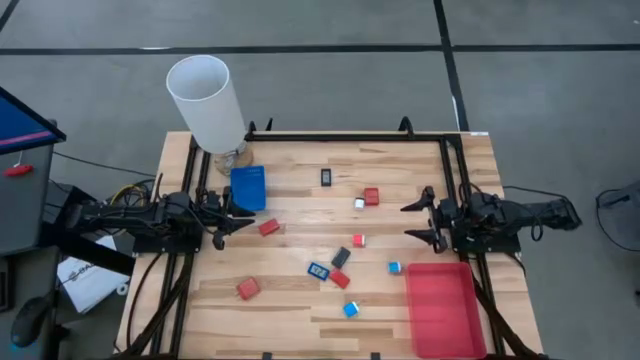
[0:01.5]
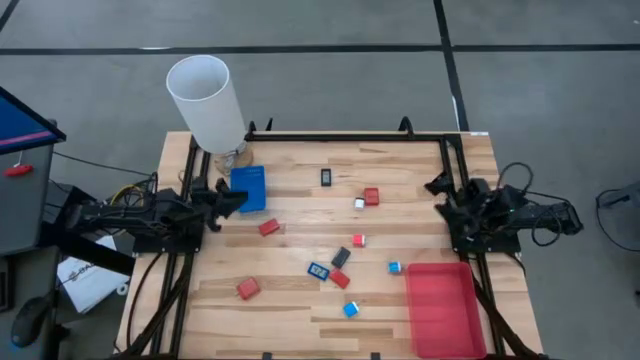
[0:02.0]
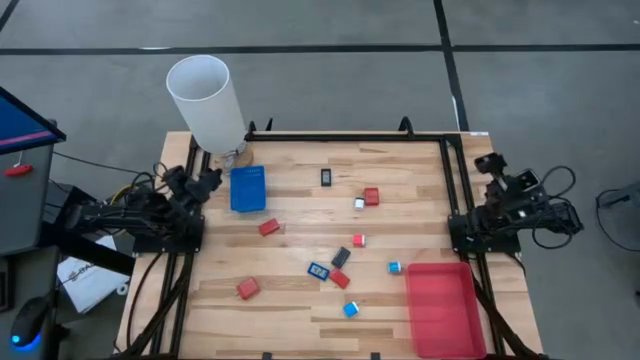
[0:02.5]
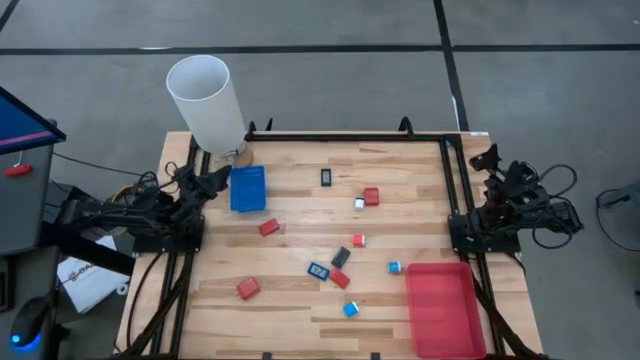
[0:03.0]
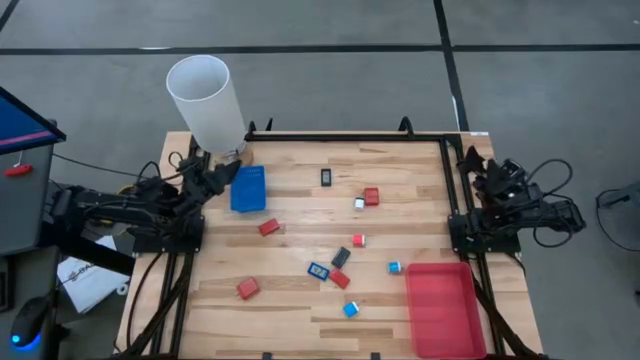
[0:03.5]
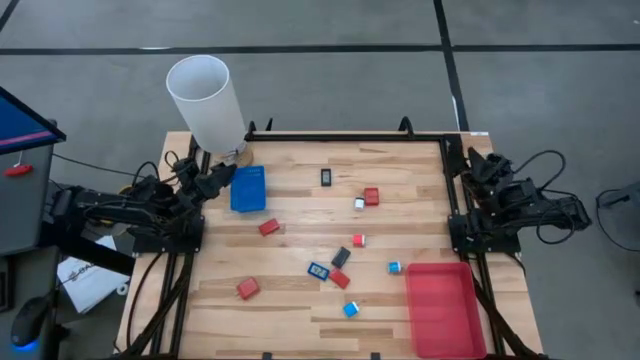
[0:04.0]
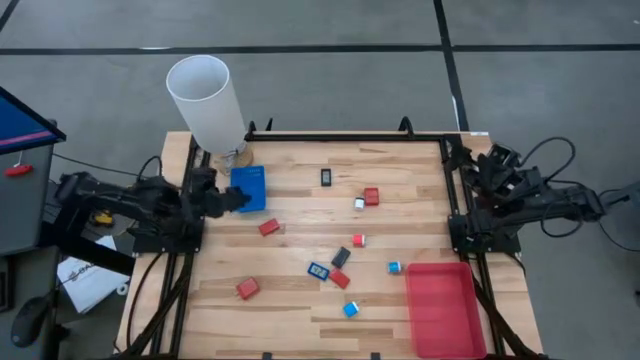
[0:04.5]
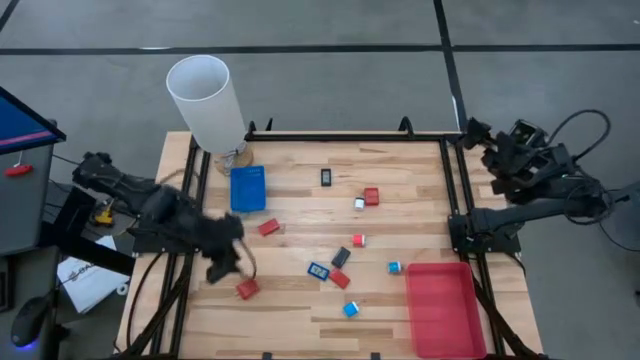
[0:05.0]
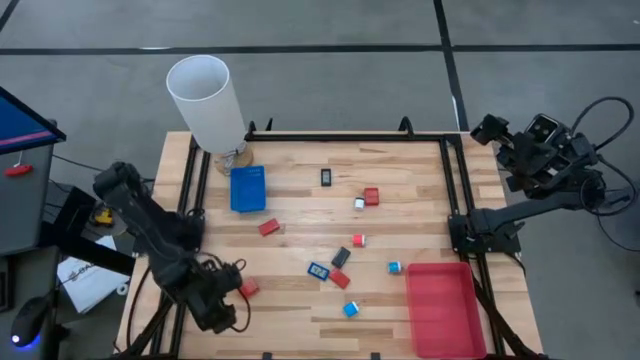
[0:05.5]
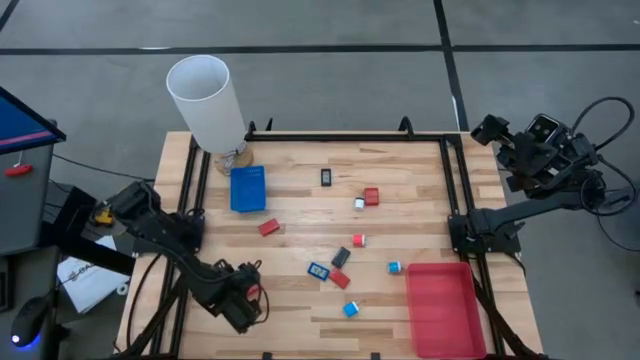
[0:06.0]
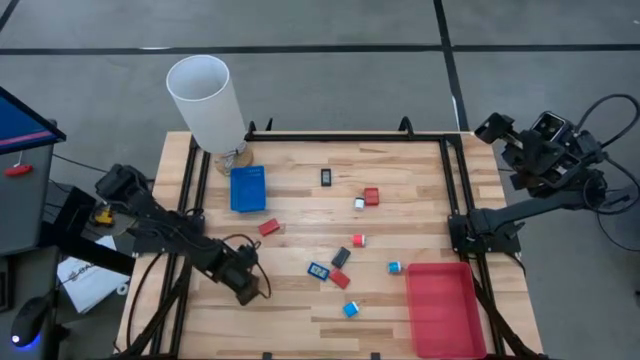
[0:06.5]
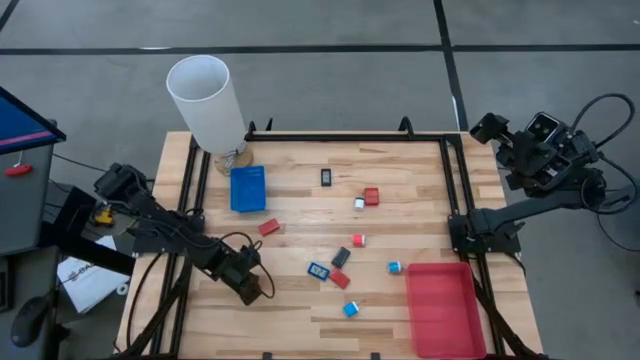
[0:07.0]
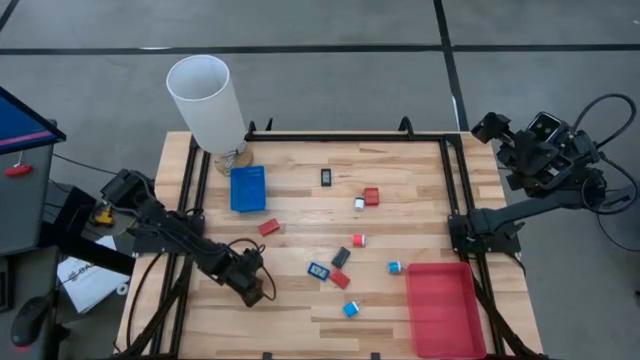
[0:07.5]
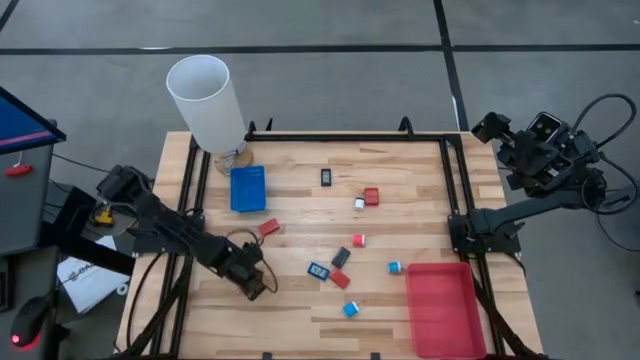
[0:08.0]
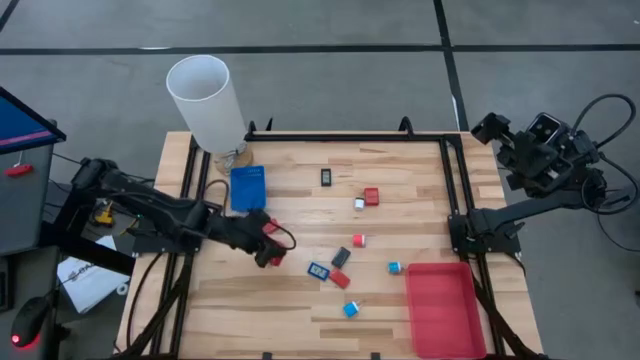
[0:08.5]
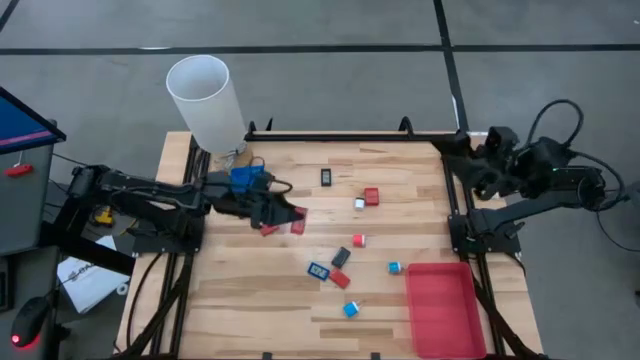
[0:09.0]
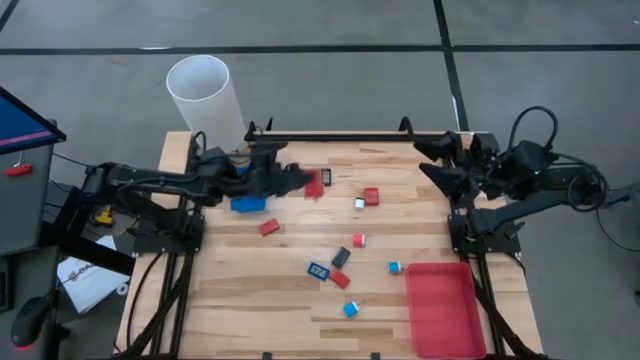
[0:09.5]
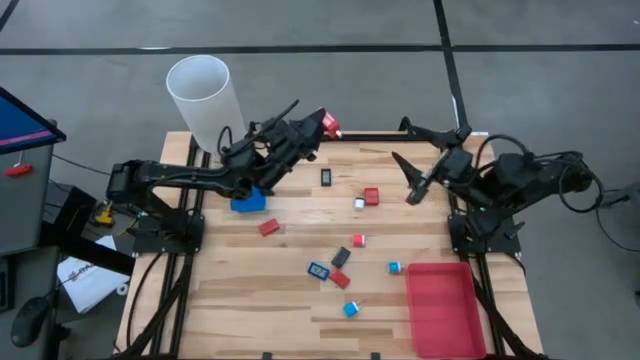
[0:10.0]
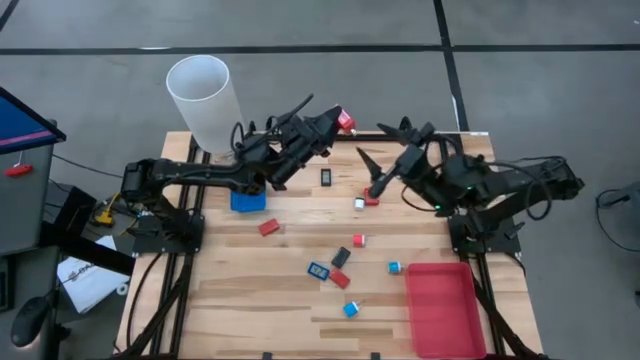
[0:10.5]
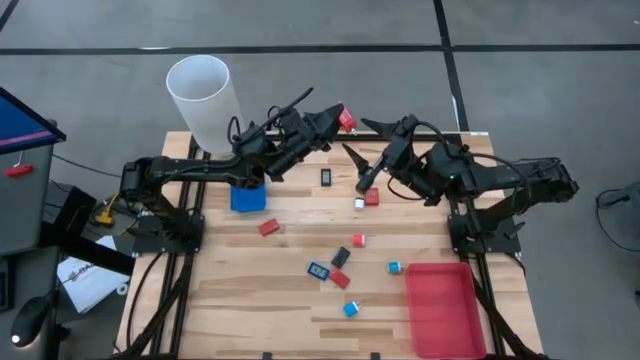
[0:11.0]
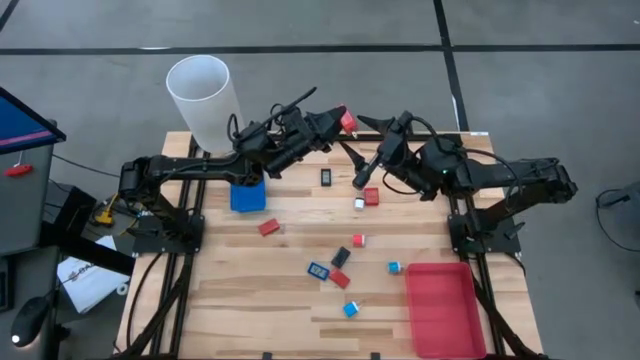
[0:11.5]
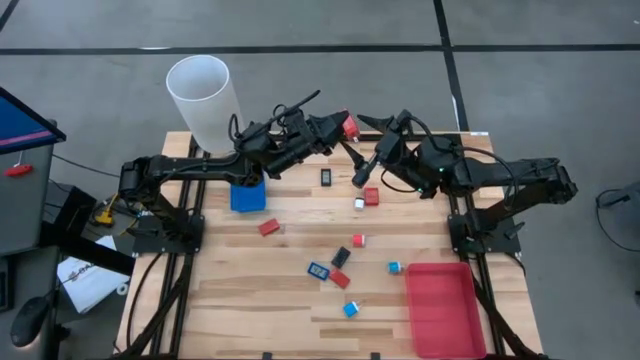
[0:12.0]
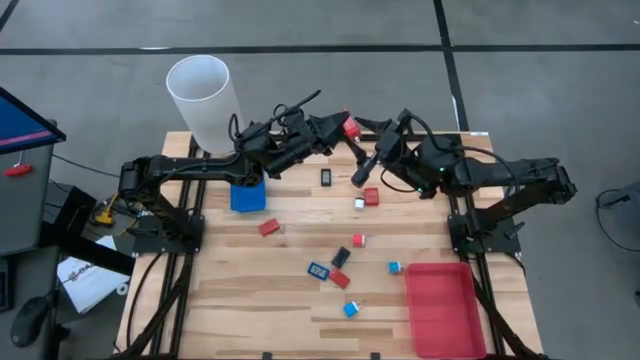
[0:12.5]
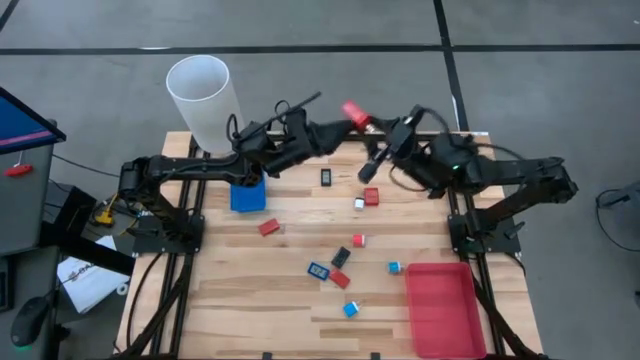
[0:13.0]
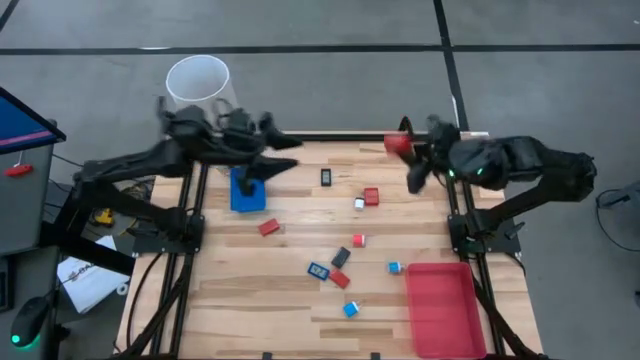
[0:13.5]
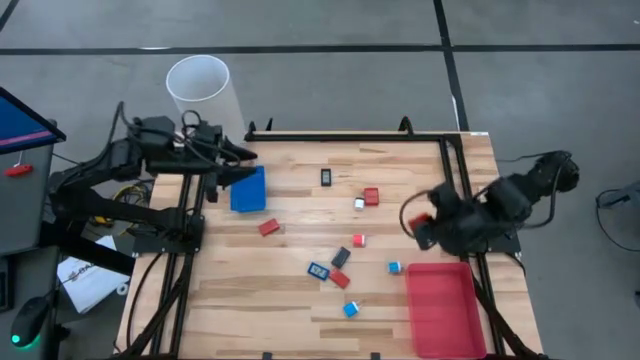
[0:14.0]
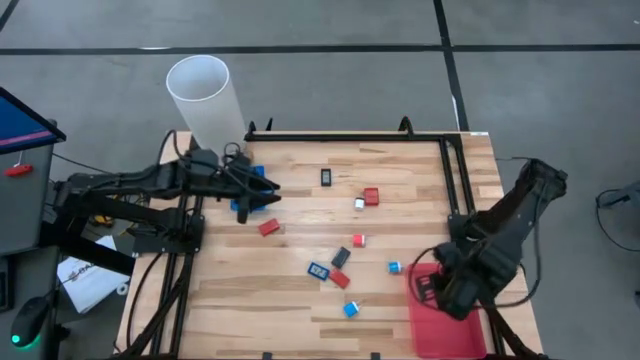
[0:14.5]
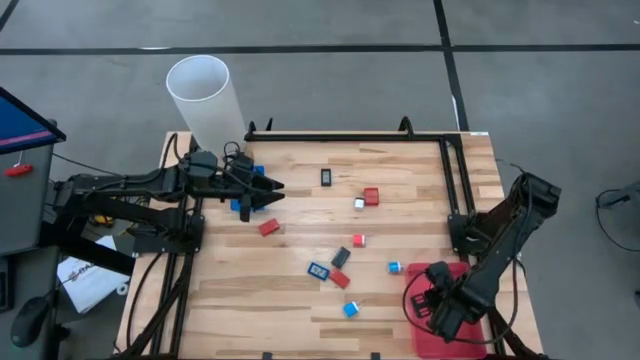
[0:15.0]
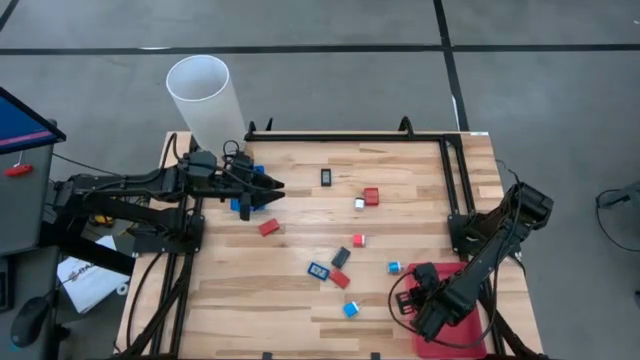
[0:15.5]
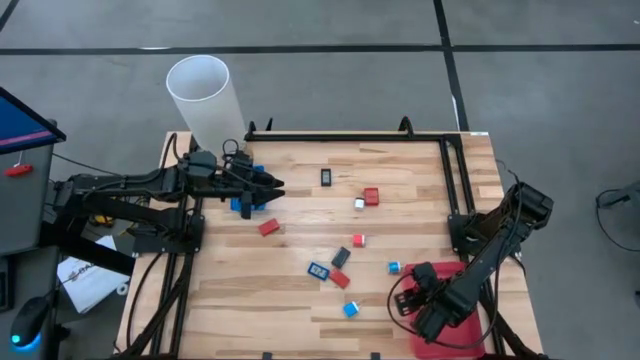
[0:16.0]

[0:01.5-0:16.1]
Task: Pick & Place Office items
Put the bottom red charger adapter into the red bin

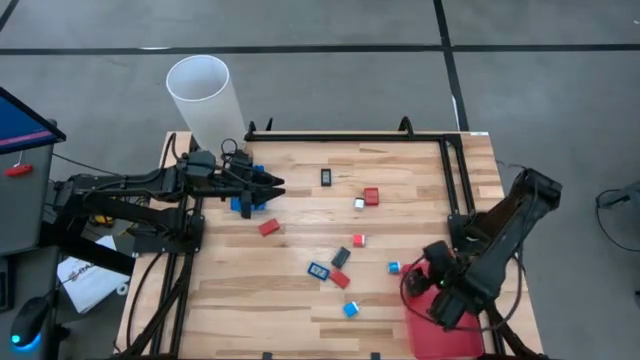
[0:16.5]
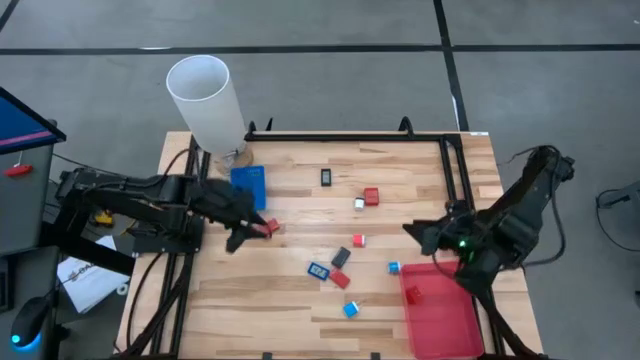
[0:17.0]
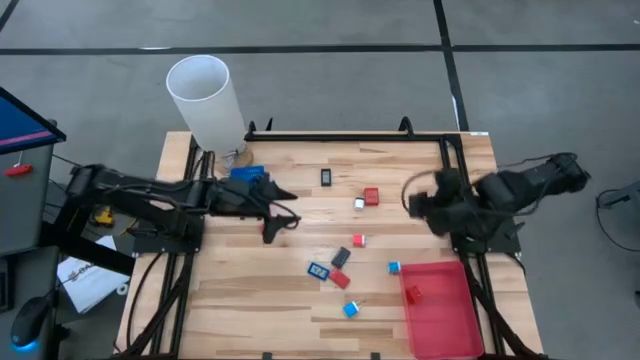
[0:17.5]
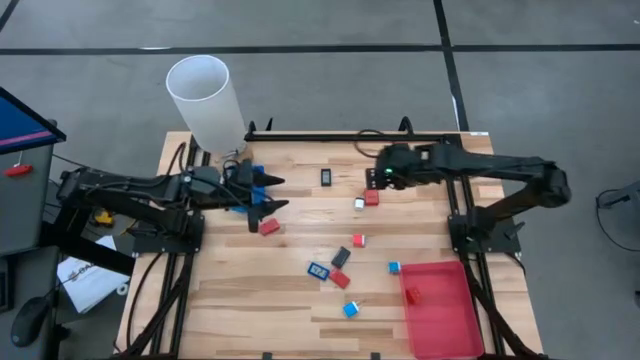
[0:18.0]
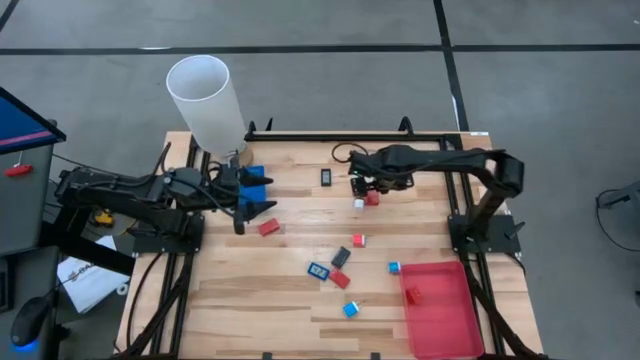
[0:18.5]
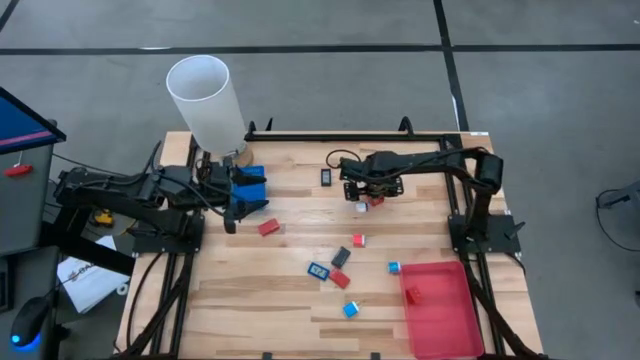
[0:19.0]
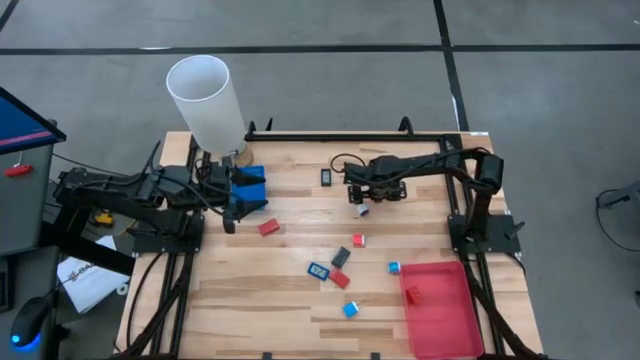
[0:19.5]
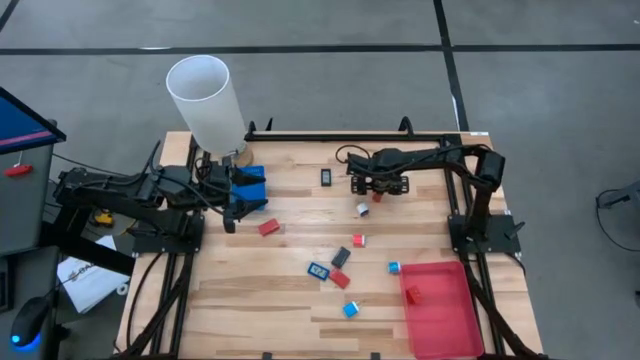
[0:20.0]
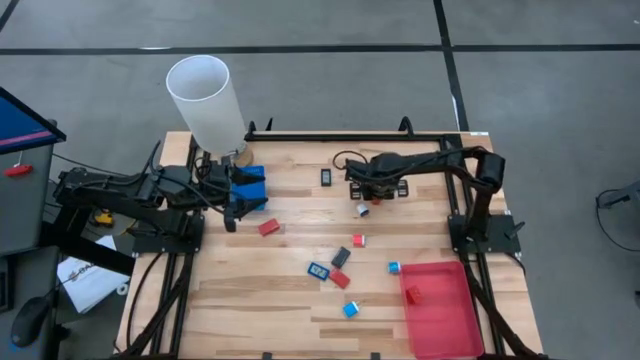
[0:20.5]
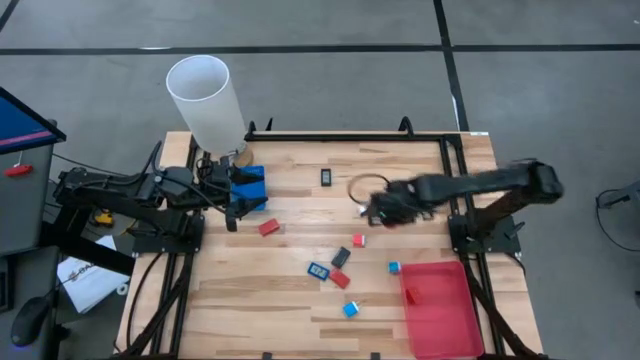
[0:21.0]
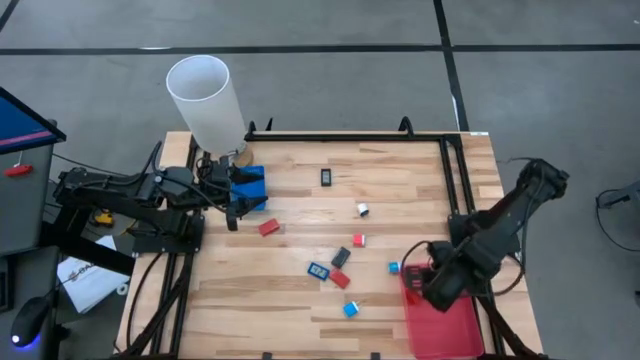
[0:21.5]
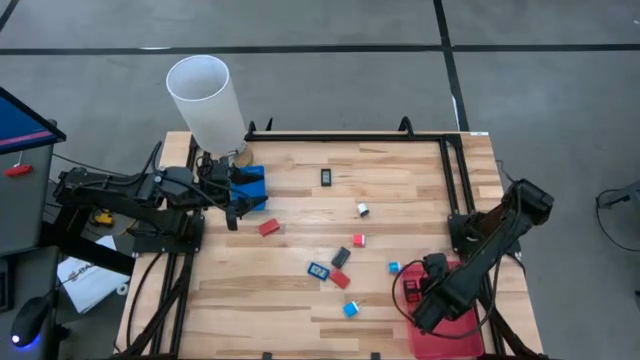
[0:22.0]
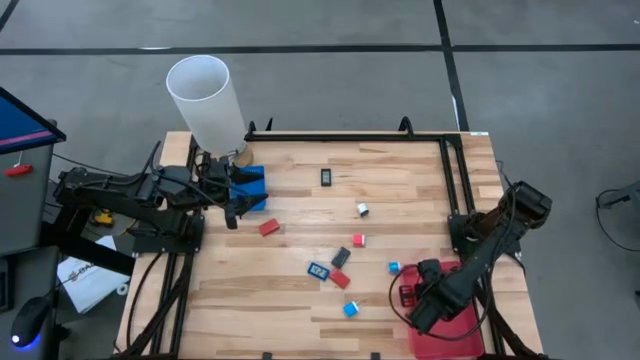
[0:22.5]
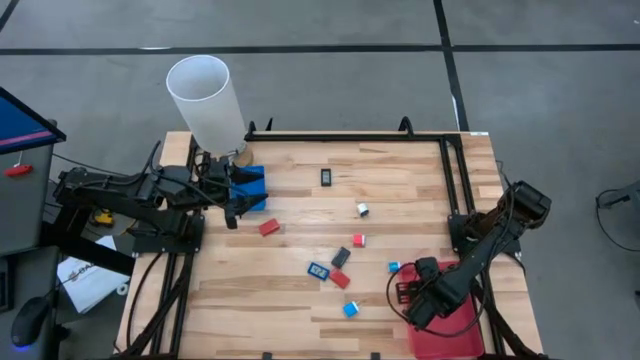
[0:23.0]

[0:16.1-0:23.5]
Put the red charger adapter into the red bin
